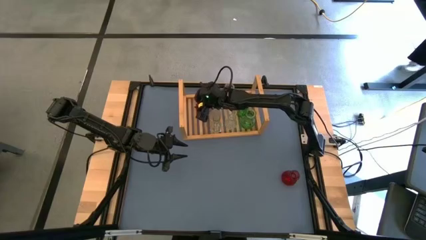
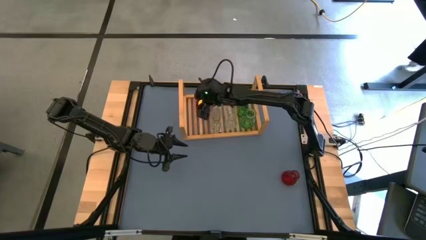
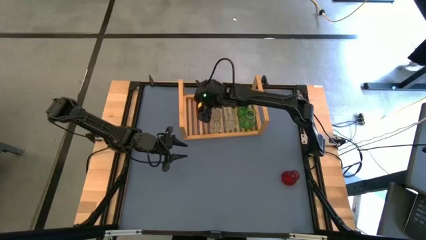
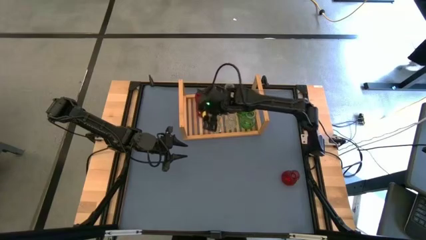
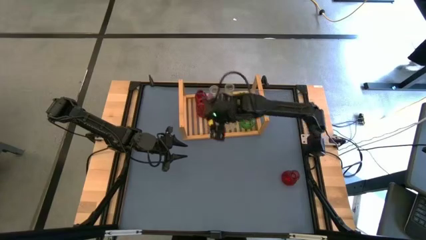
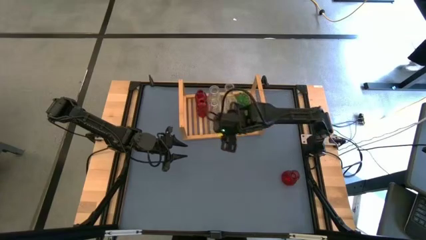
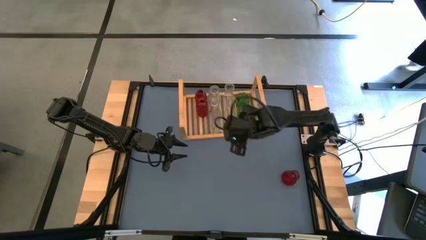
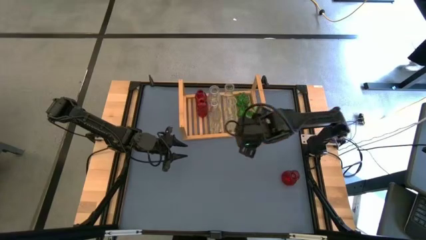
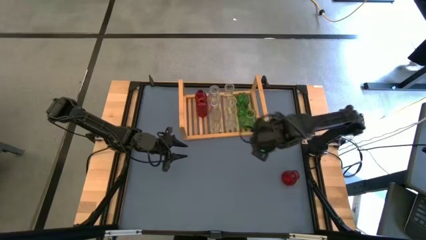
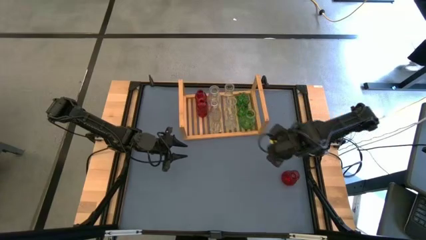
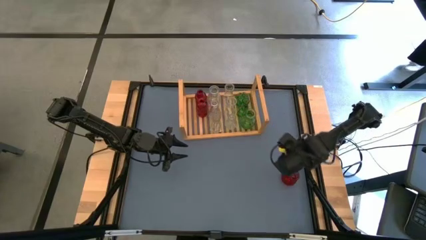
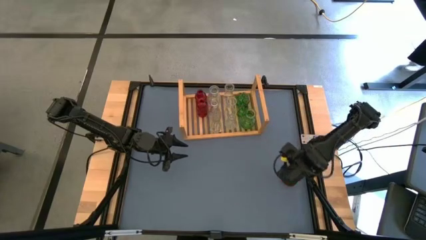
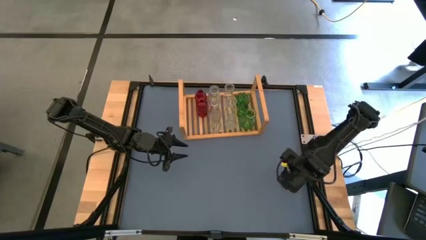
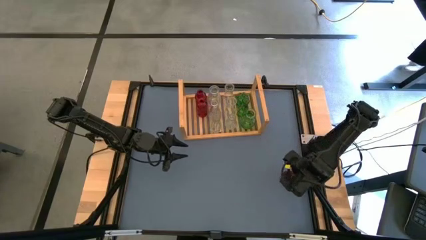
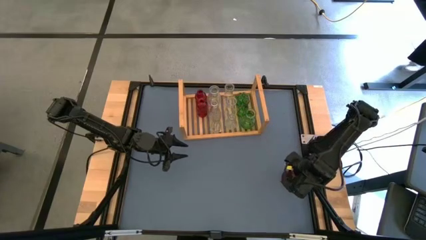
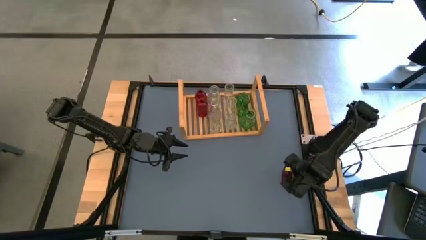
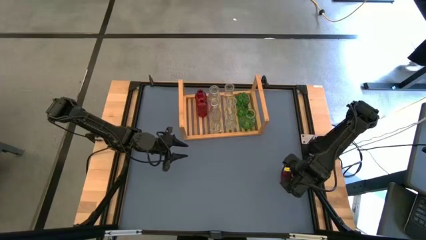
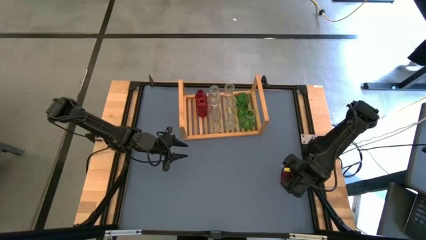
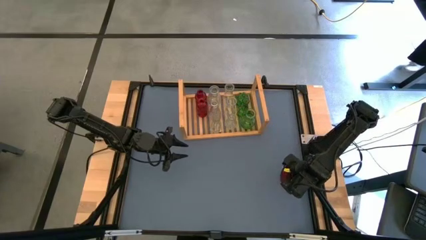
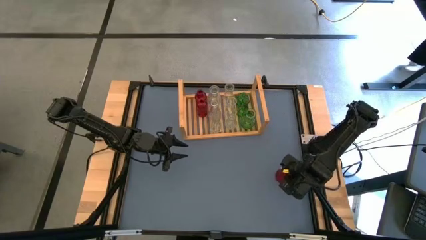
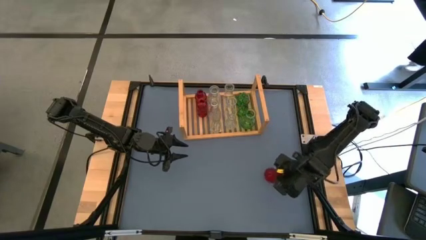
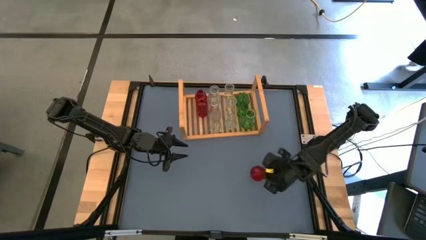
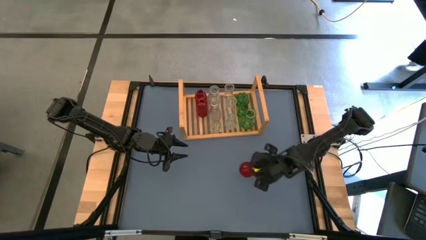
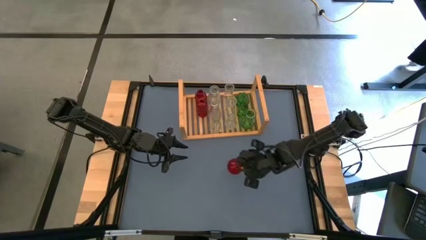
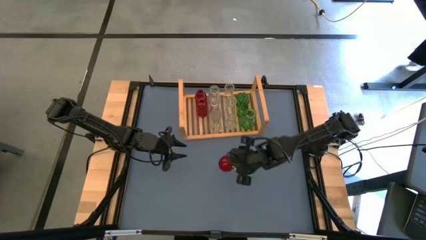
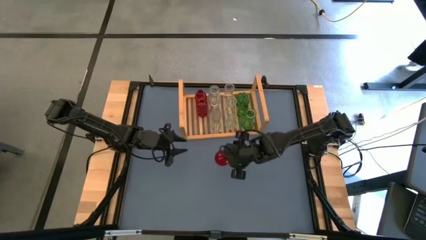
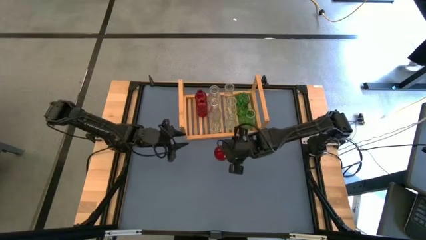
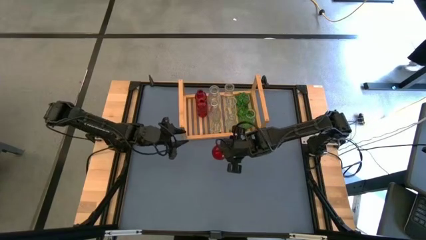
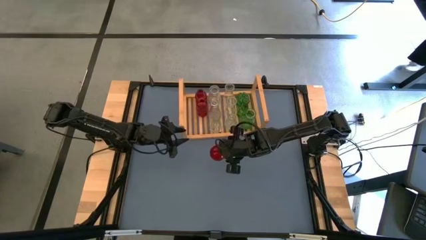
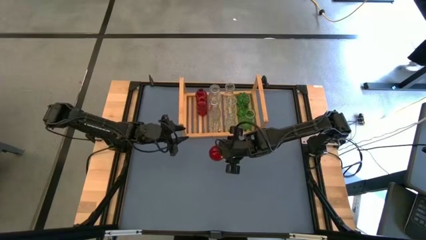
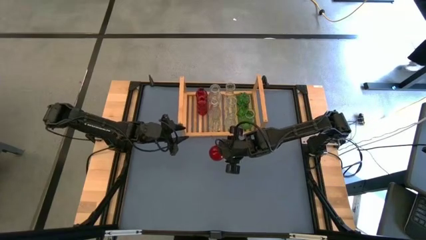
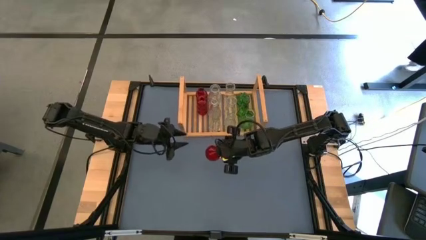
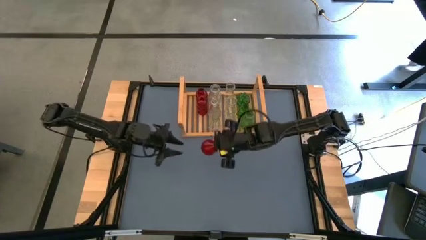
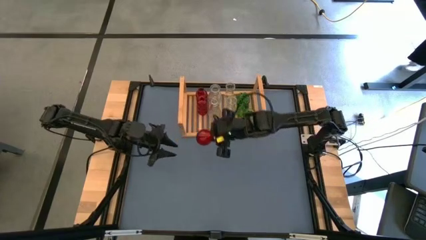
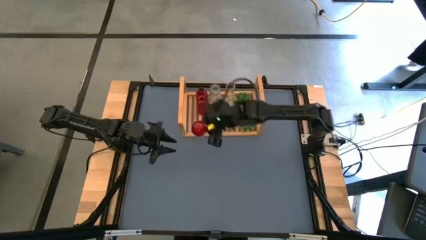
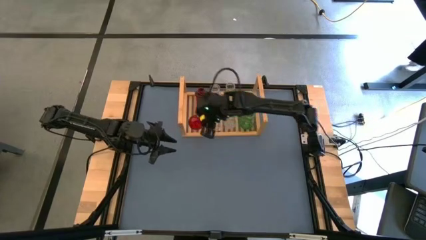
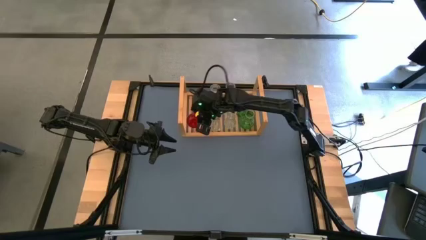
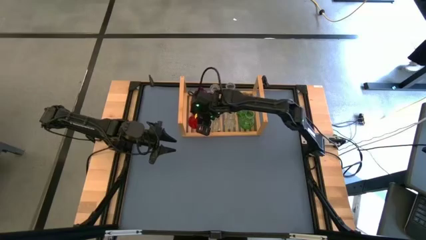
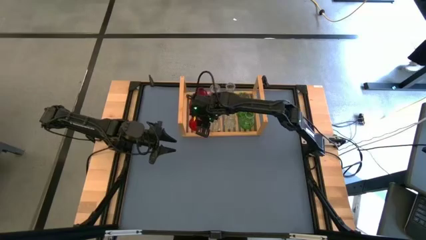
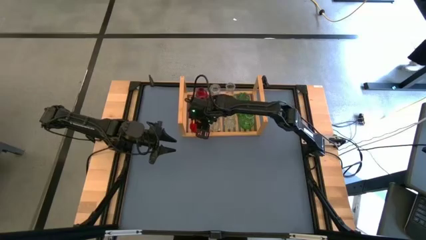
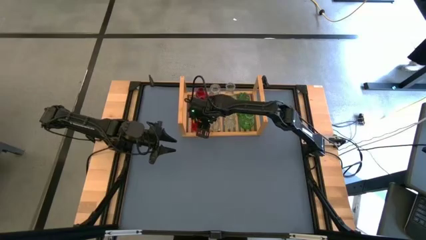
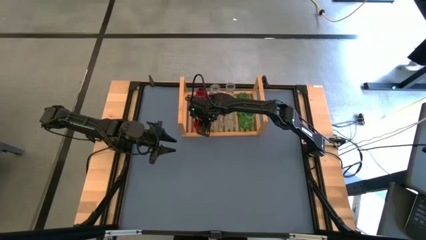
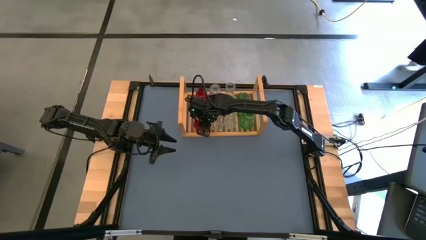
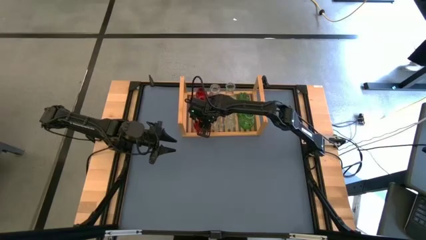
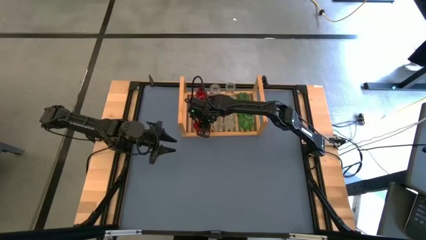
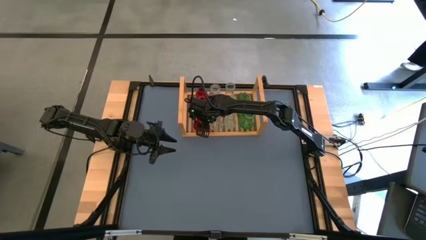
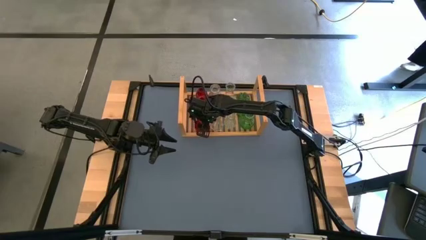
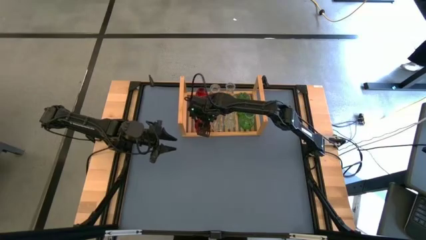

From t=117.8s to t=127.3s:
Task: sort vases onto shelf
Put the red vase on the shelf aligned with the other red vase

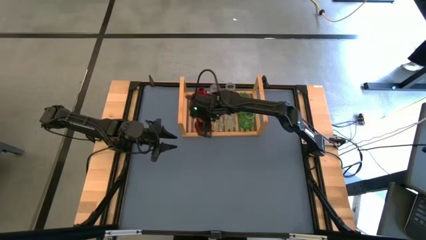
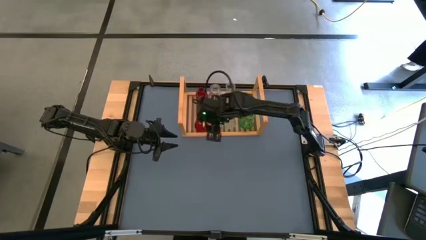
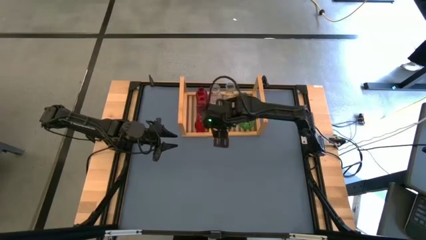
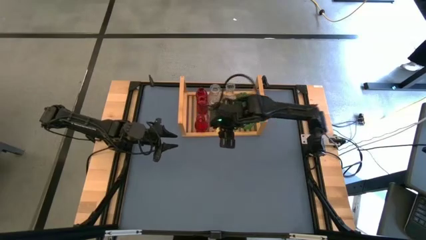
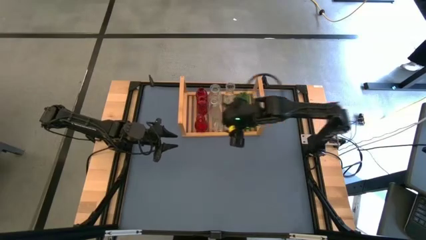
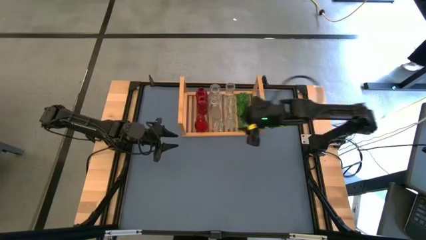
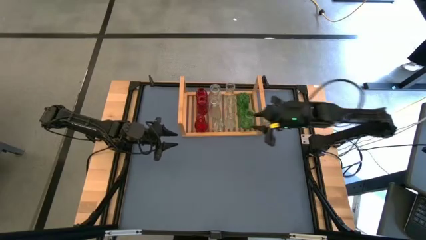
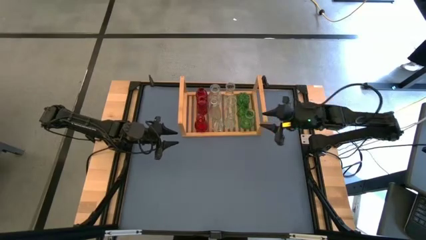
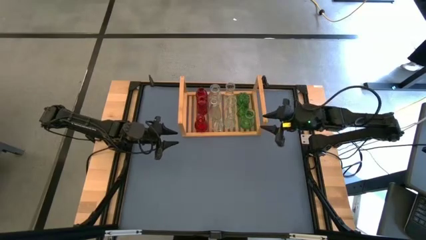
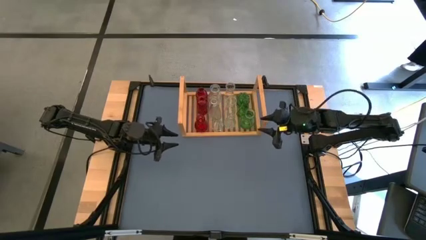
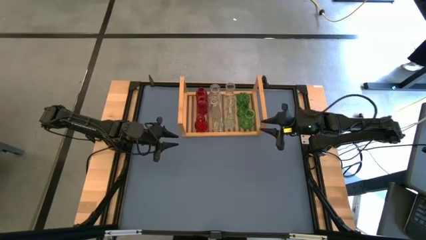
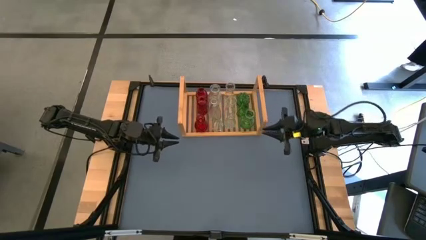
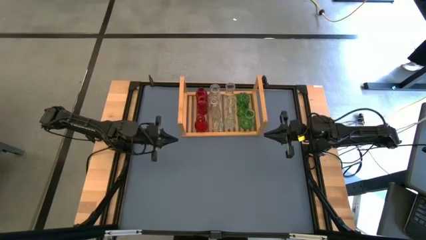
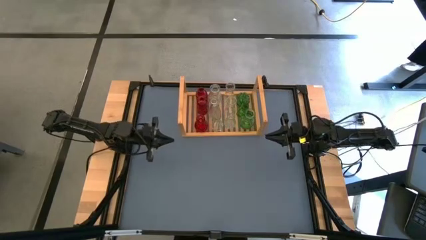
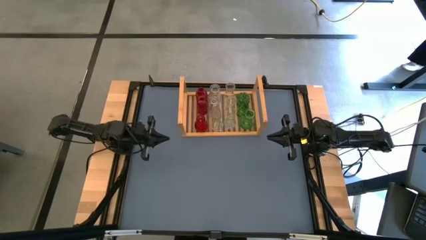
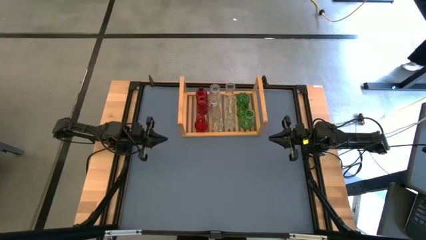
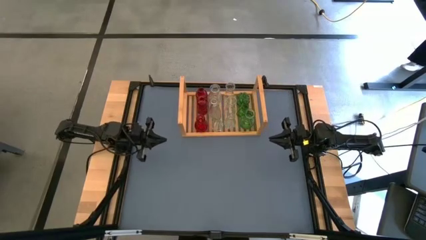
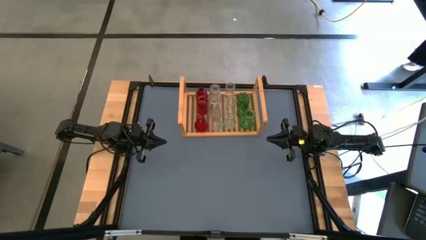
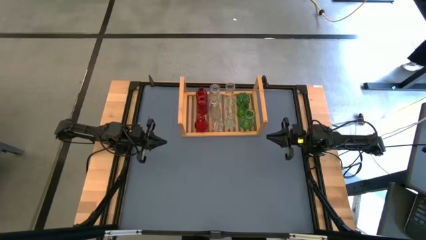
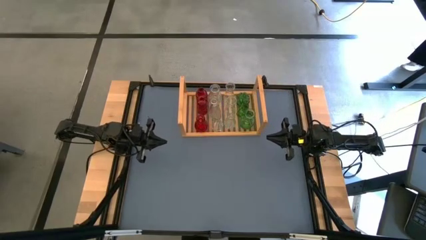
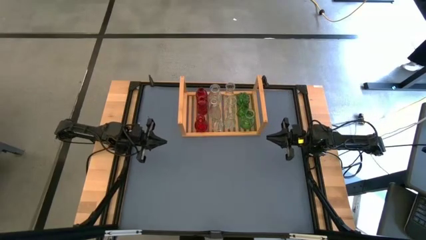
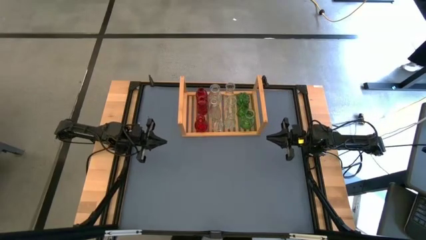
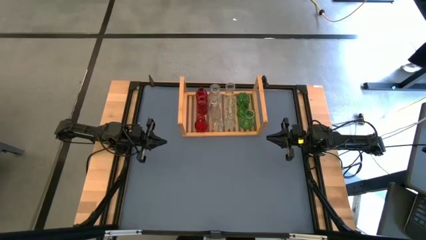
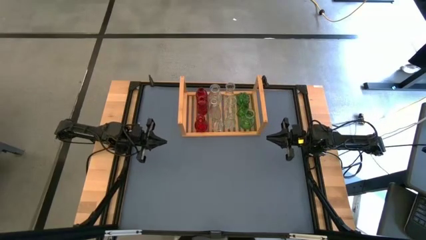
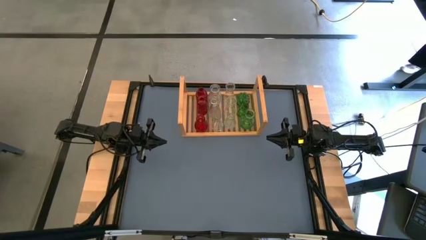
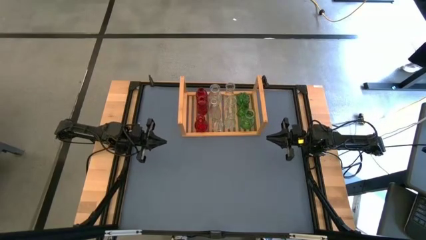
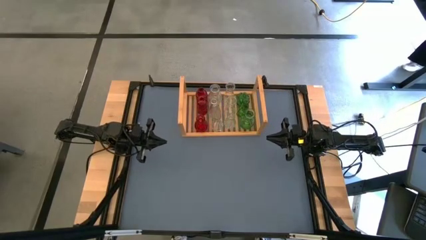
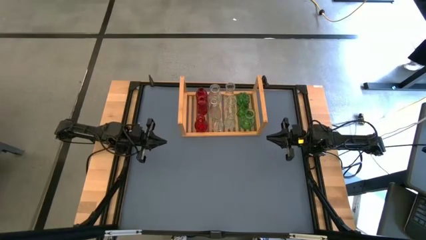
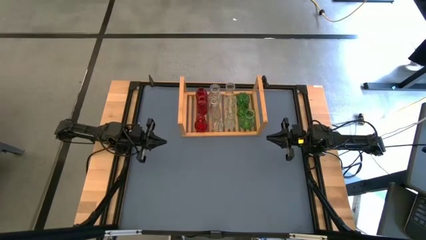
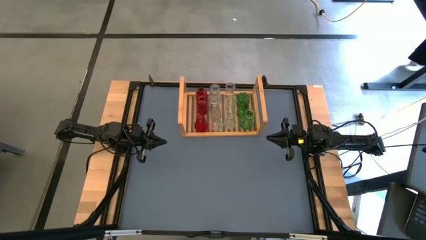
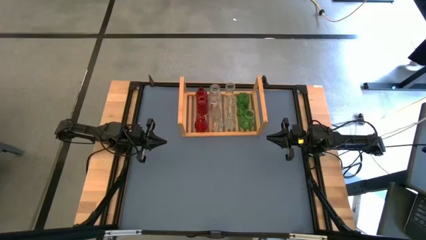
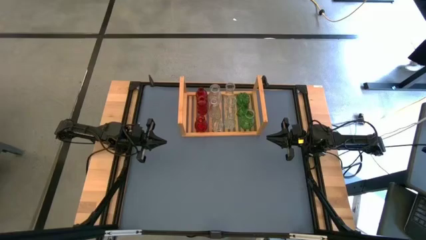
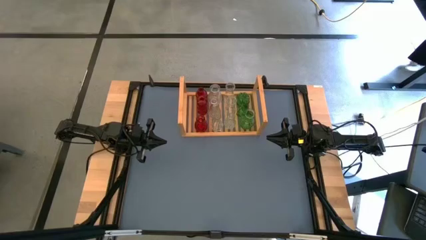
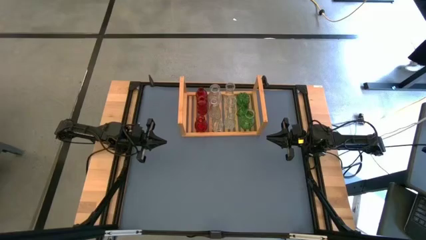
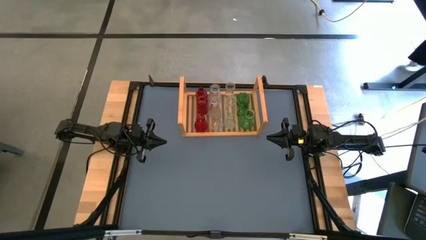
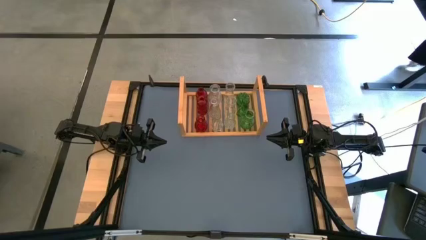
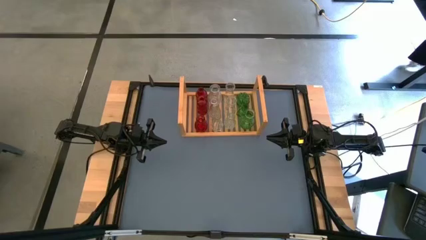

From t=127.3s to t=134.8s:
Return to Home Position
